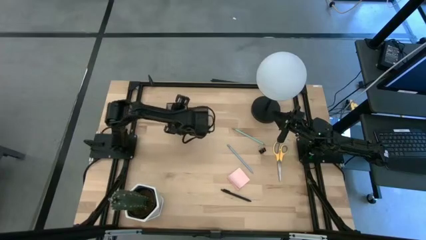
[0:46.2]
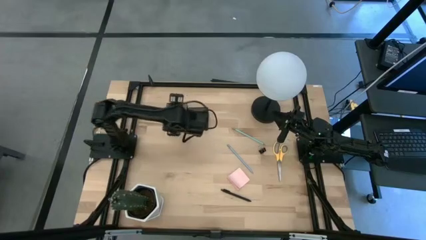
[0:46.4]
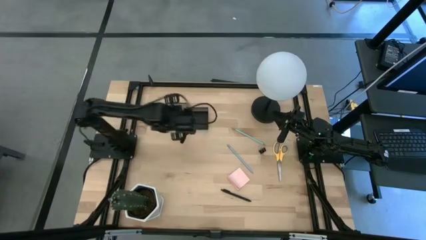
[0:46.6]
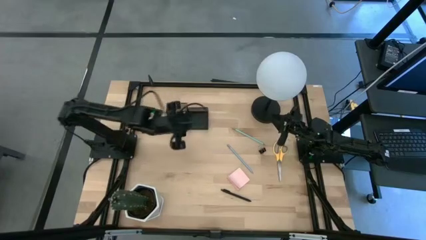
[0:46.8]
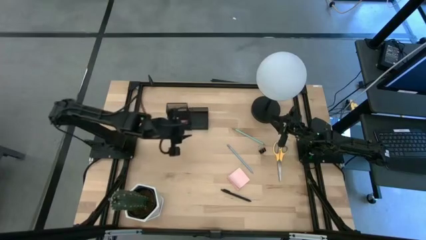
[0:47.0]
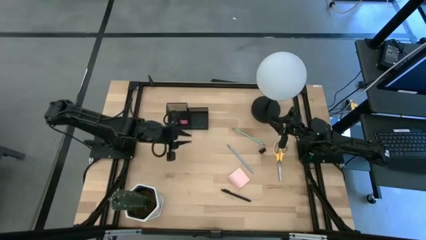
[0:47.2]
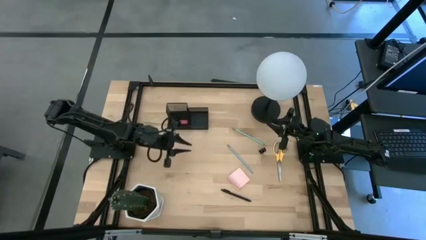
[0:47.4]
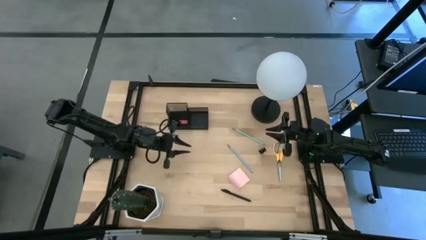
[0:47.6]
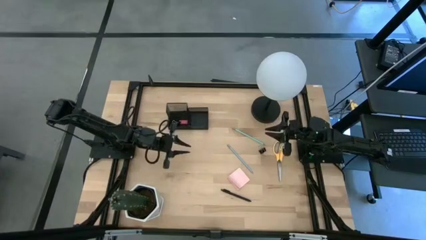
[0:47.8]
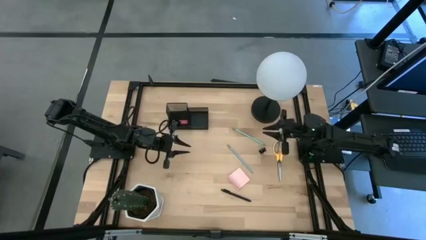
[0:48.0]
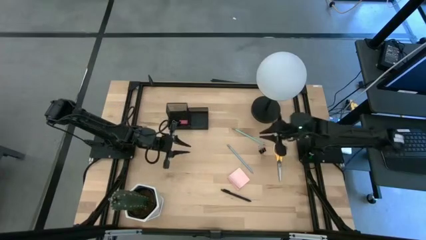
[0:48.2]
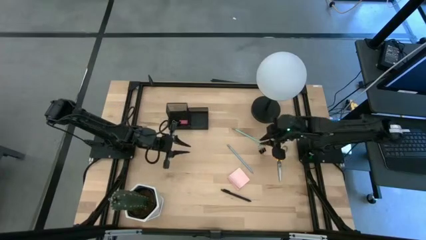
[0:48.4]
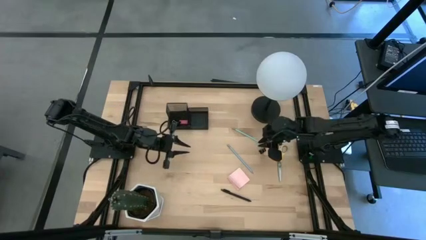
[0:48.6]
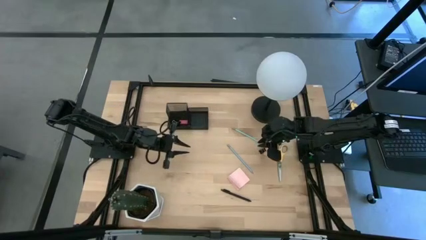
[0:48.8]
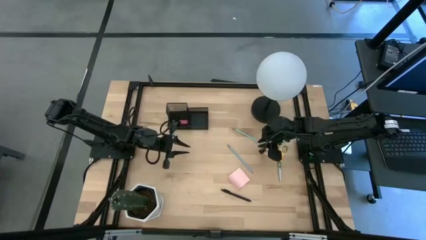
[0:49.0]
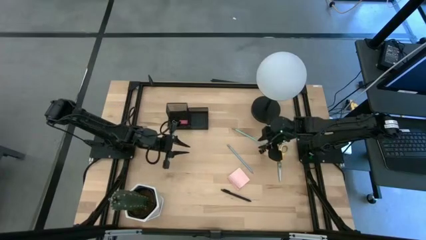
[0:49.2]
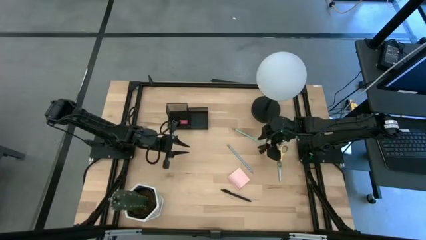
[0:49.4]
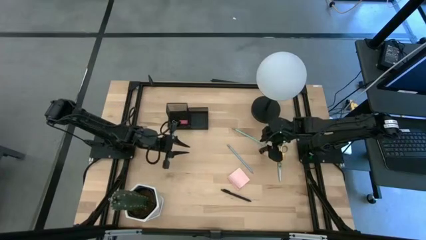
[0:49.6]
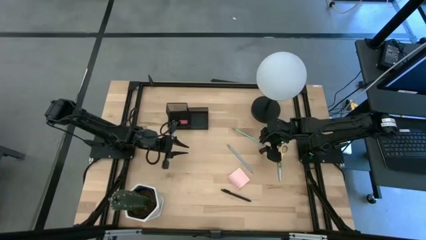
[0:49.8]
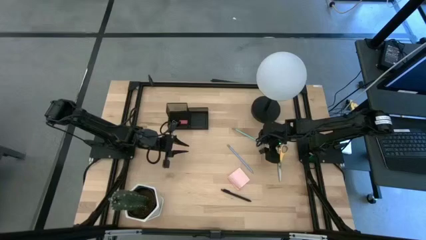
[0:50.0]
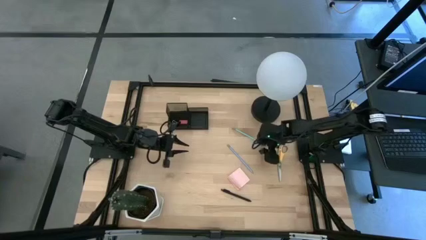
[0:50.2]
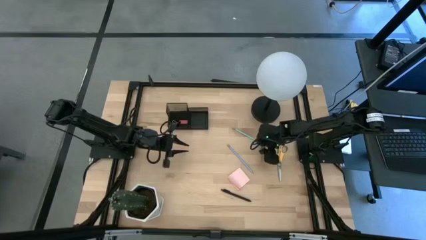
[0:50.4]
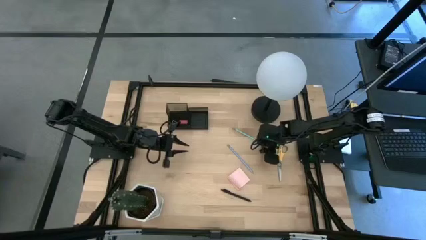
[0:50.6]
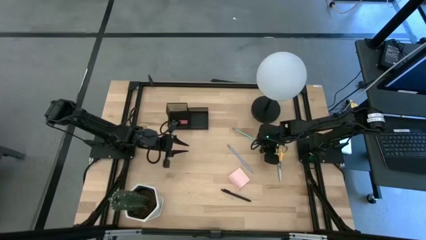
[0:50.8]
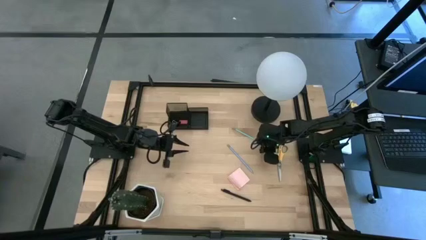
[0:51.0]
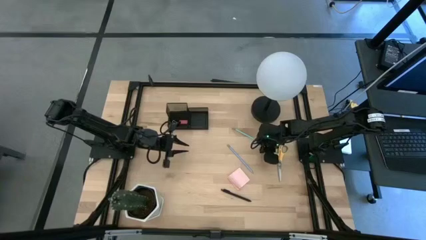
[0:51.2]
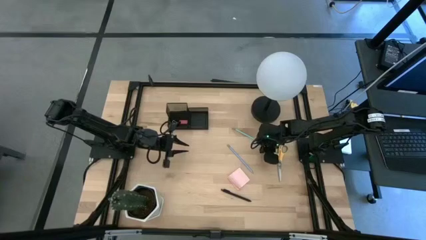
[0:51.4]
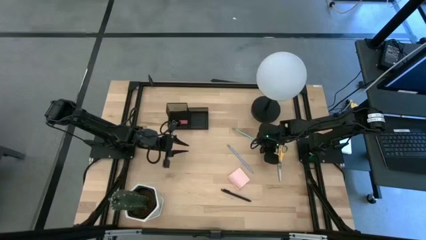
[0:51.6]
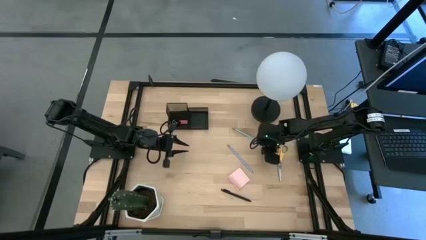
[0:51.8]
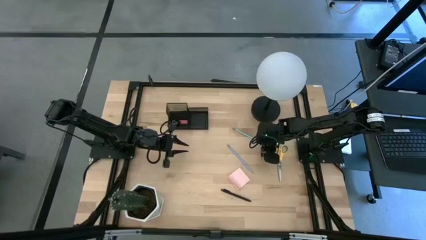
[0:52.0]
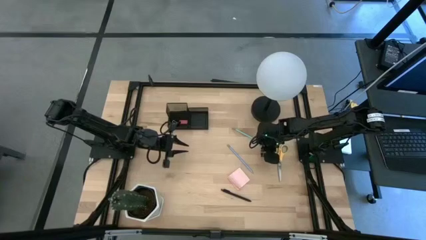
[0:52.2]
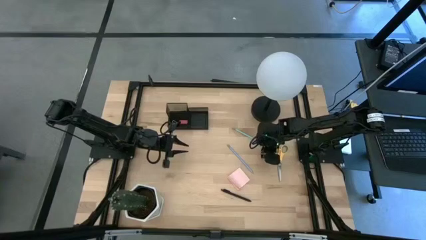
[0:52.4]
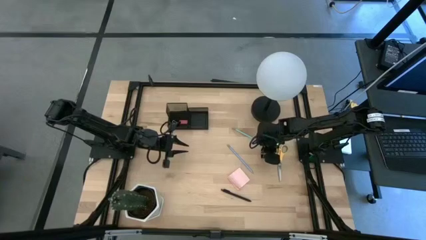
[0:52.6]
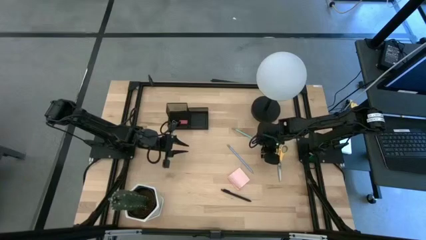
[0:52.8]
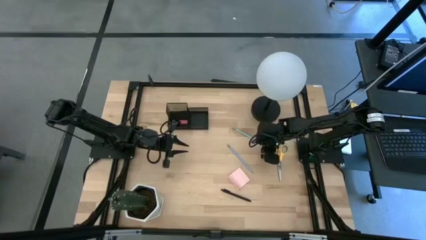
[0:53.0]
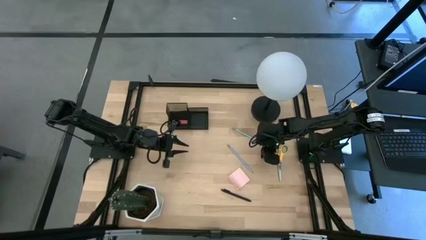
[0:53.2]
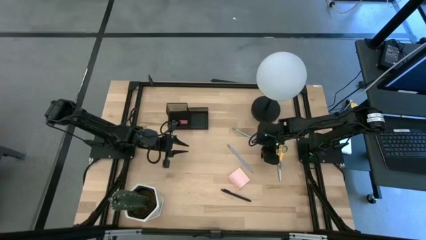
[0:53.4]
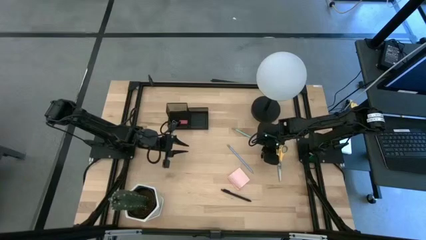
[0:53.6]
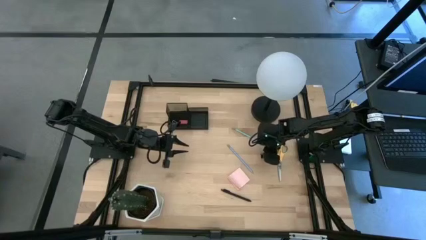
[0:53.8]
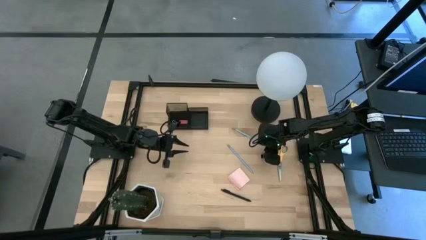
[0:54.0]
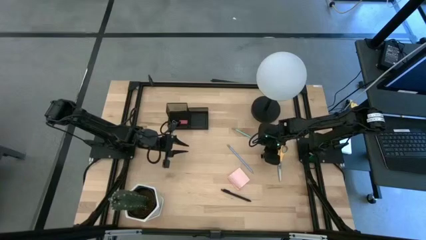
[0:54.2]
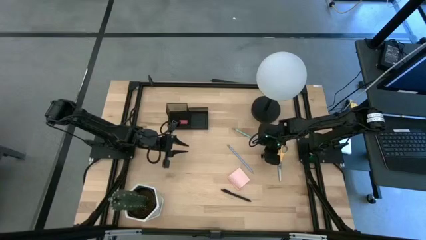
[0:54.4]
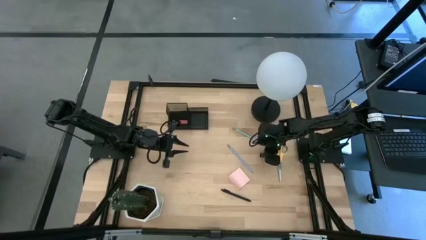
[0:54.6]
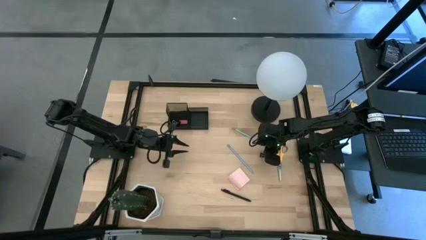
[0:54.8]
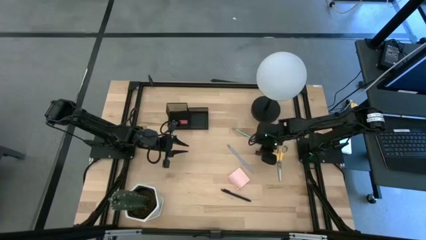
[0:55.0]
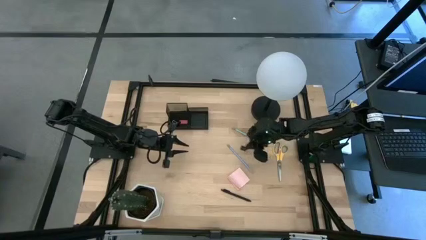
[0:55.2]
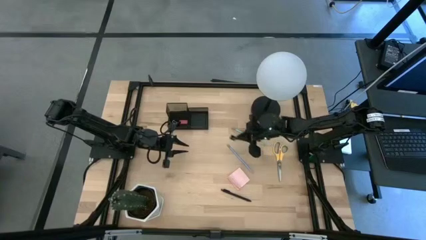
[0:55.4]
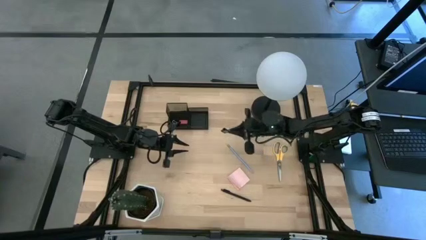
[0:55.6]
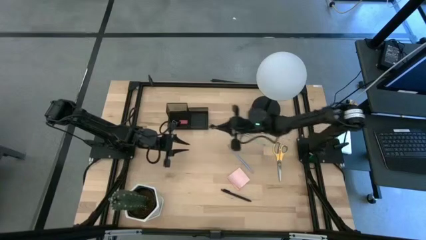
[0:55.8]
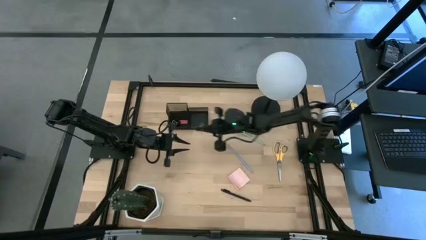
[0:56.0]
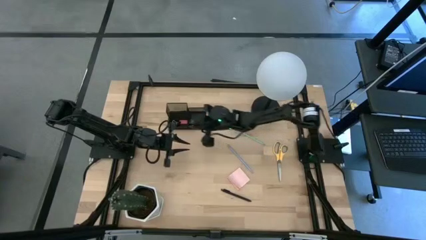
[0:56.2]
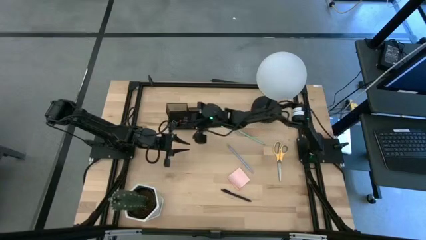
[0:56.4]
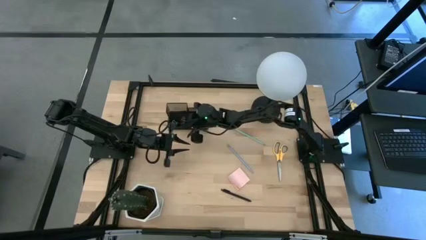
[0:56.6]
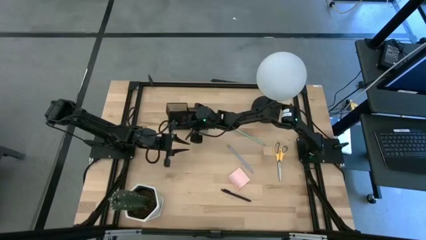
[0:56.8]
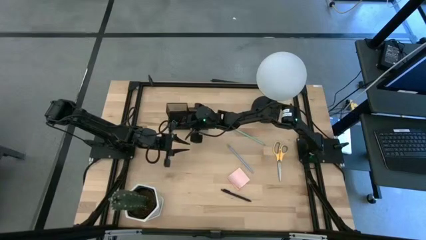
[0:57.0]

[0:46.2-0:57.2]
Task: Pick and place office supplies into organizer
Put the binder clip into the desk organizer

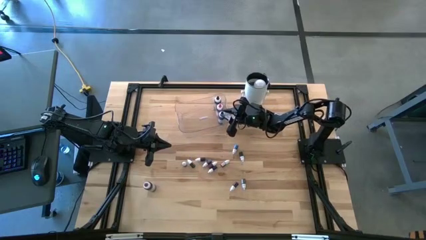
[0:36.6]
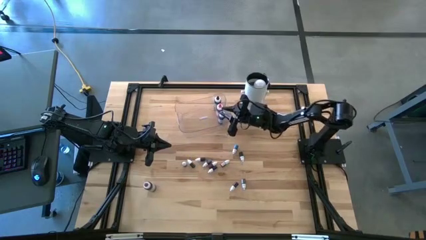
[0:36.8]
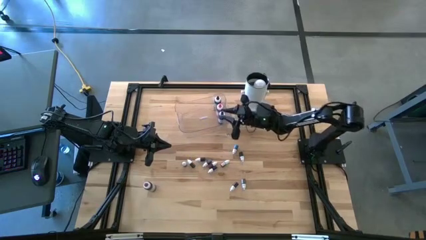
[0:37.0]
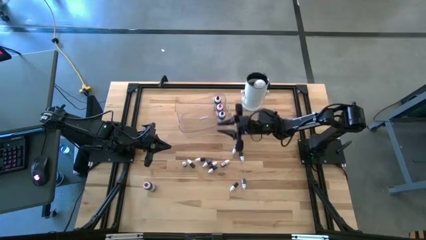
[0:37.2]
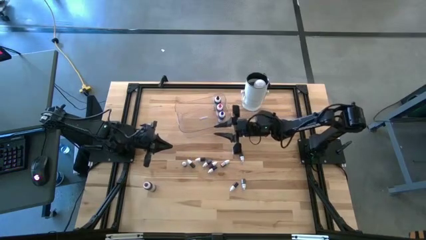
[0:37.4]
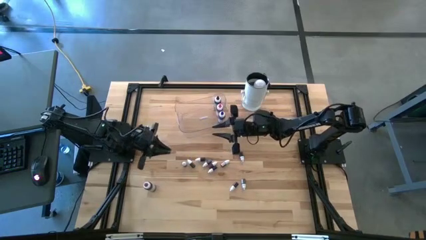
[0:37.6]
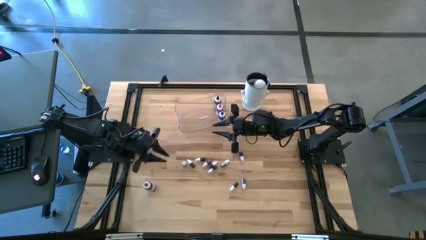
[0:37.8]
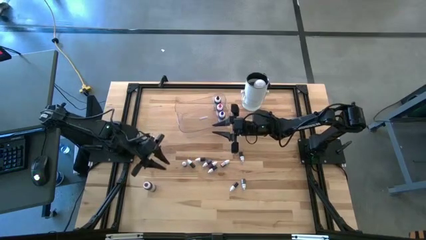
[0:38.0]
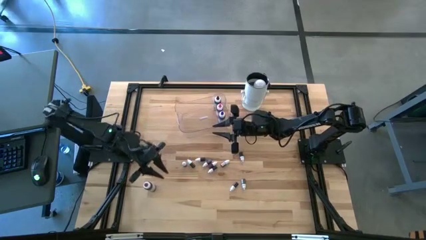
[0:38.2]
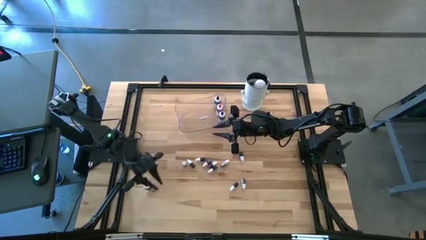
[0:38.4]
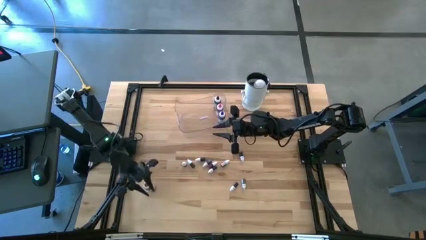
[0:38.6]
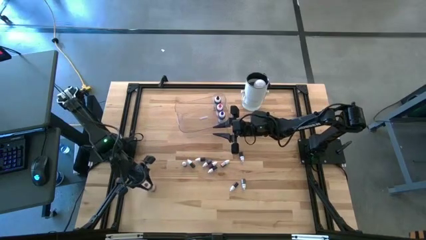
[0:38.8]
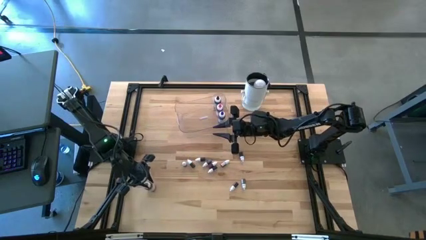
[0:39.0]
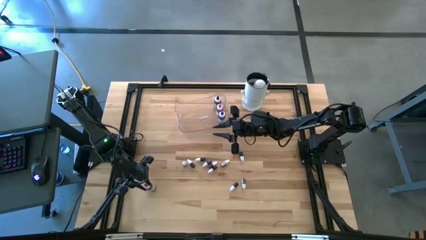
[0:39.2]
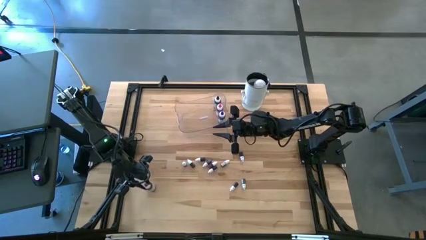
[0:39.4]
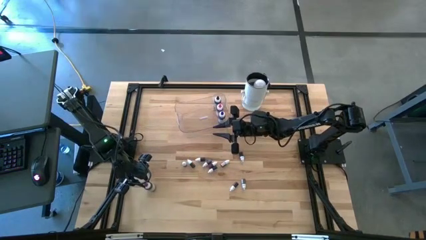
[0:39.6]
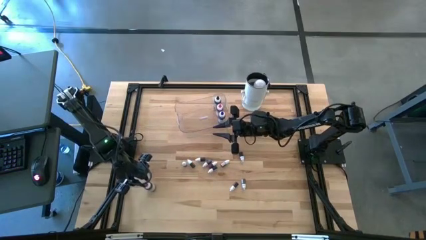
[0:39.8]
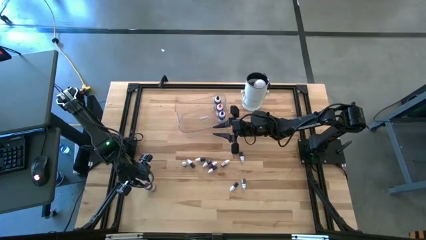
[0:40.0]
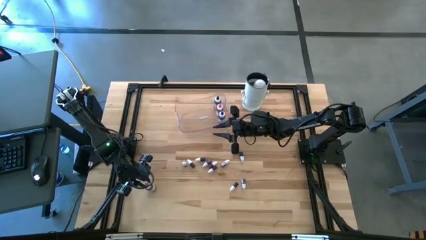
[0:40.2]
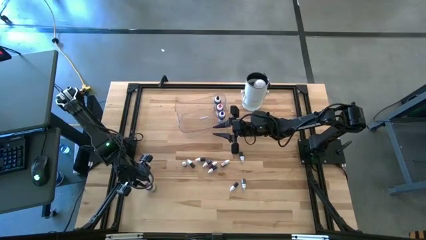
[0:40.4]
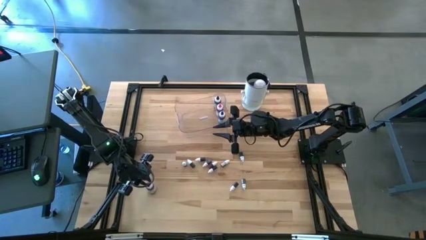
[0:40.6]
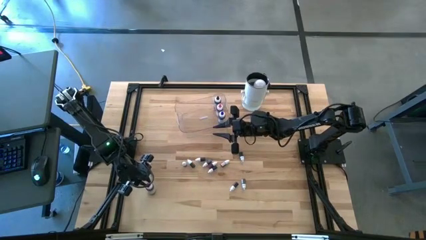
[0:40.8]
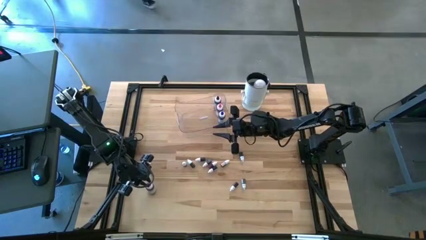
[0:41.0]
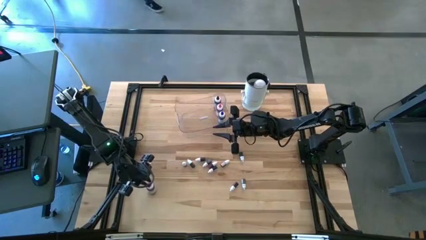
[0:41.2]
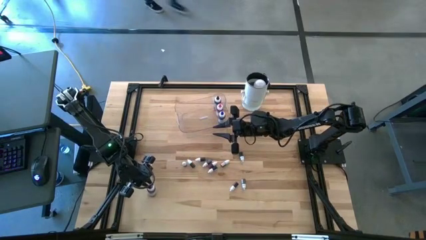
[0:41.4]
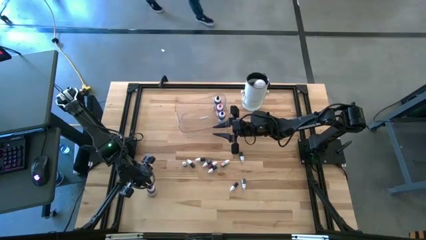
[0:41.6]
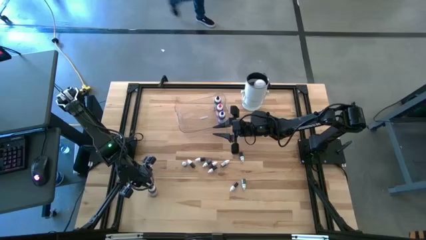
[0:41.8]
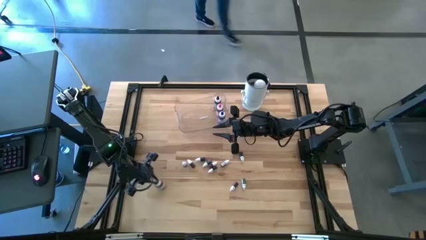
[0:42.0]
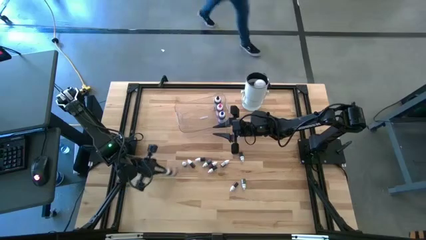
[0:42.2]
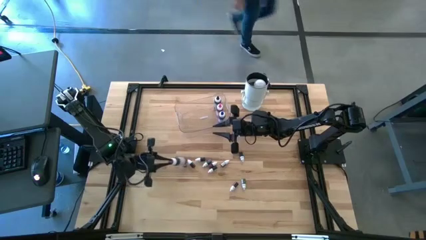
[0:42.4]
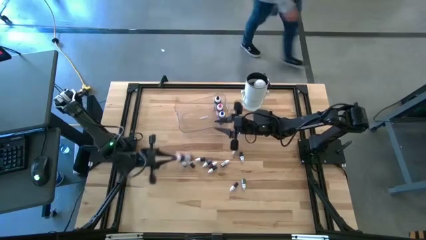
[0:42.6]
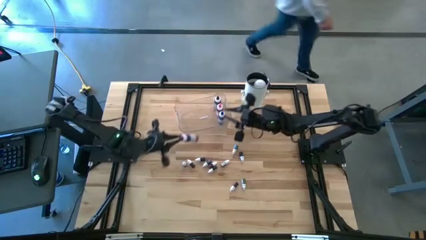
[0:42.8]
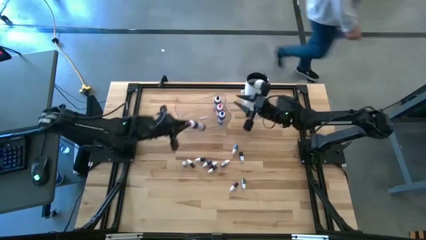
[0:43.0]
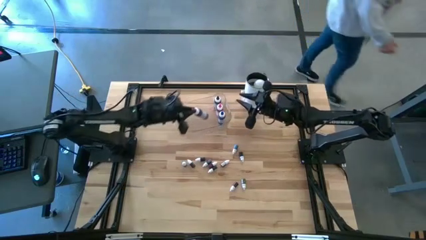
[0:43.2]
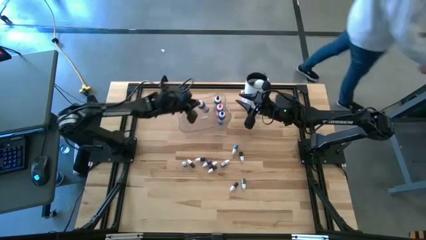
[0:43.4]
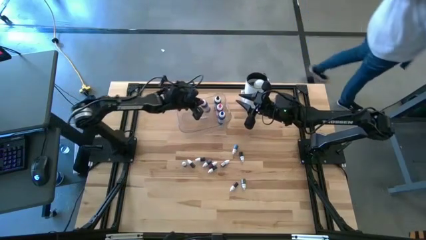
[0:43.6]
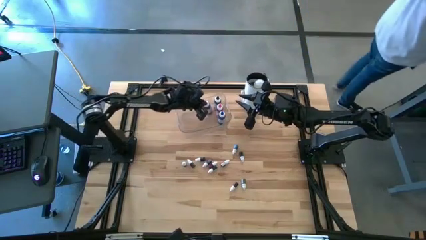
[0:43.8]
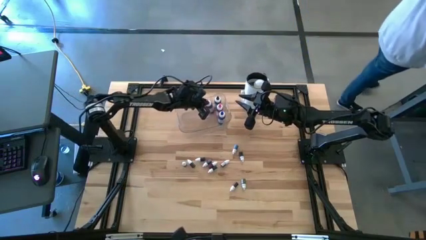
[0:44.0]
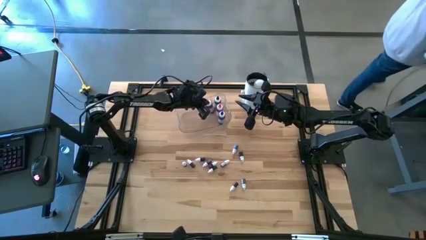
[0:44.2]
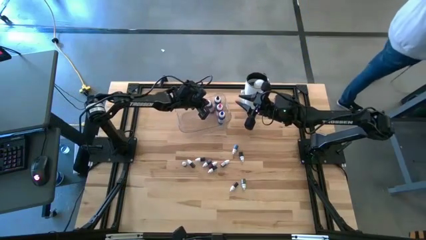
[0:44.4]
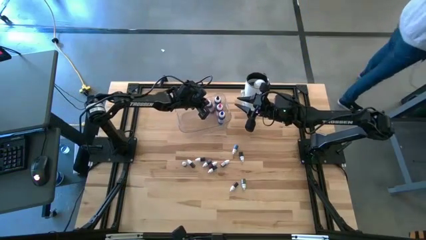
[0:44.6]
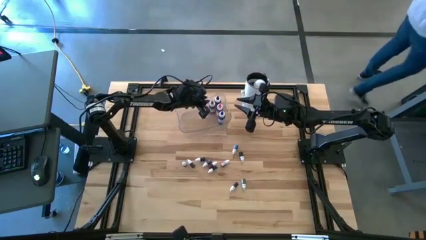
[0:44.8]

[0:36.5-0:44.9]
Task: Pick & Place food coloring
Put the large purple food coloring bottle into the transparent container
